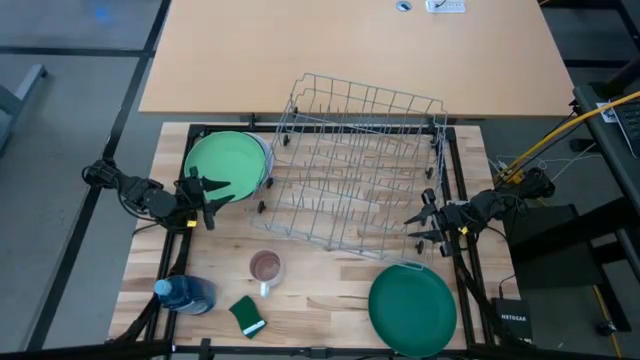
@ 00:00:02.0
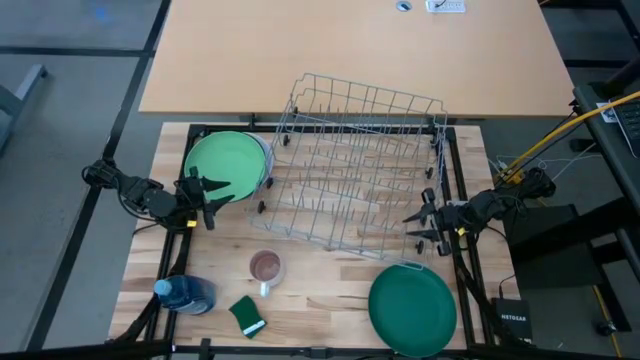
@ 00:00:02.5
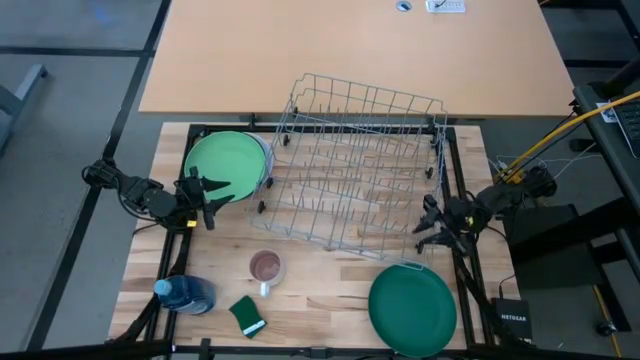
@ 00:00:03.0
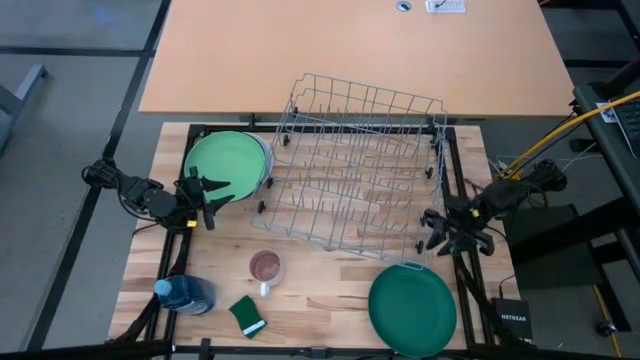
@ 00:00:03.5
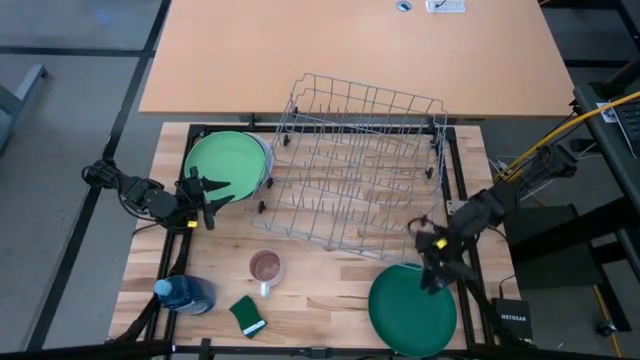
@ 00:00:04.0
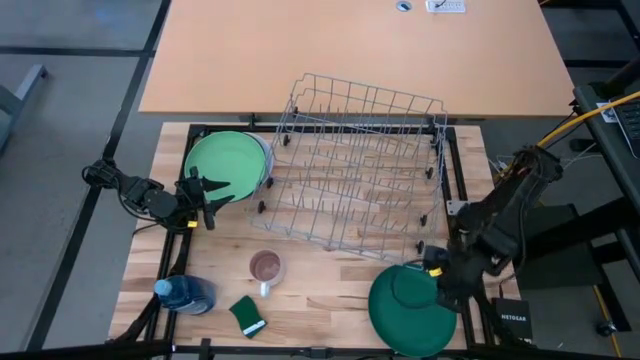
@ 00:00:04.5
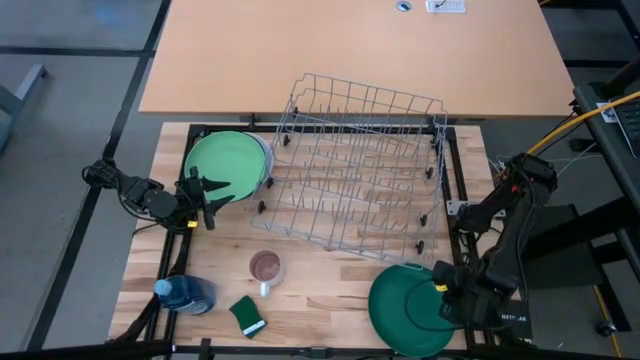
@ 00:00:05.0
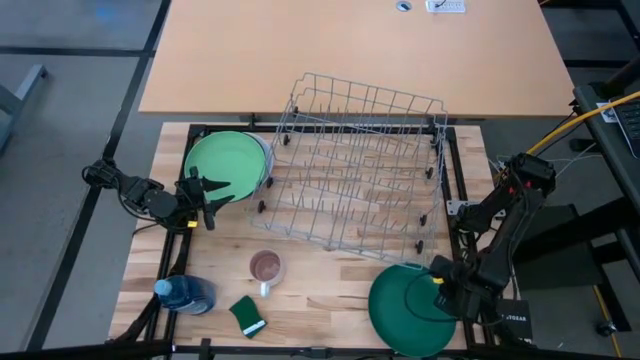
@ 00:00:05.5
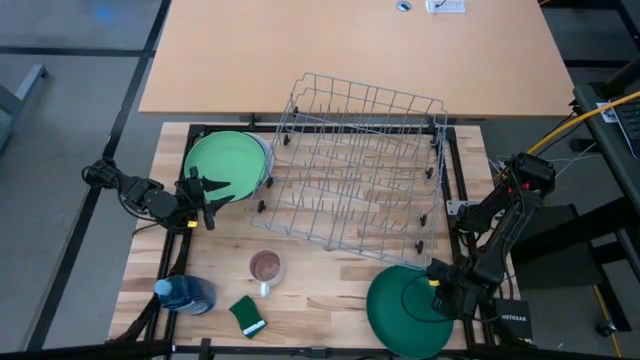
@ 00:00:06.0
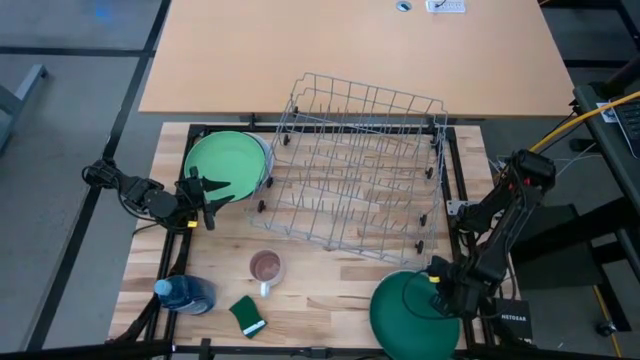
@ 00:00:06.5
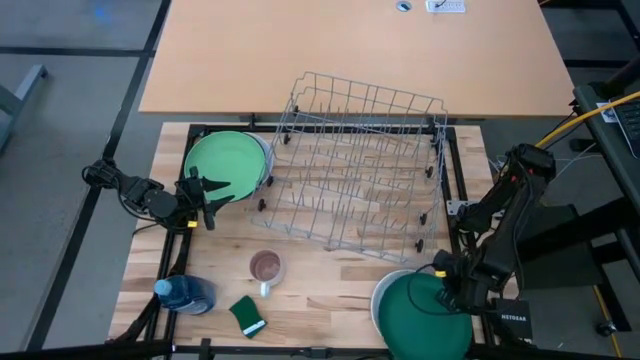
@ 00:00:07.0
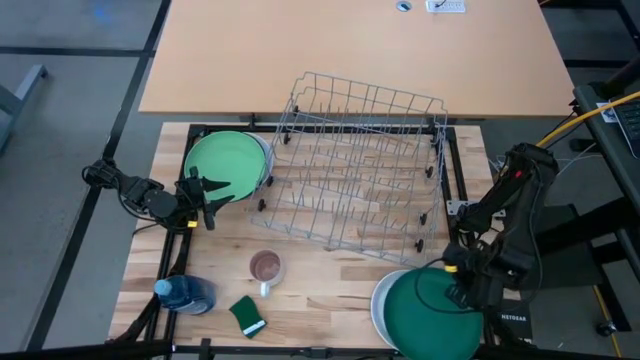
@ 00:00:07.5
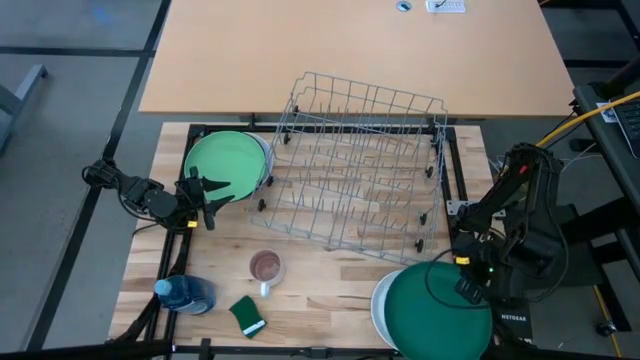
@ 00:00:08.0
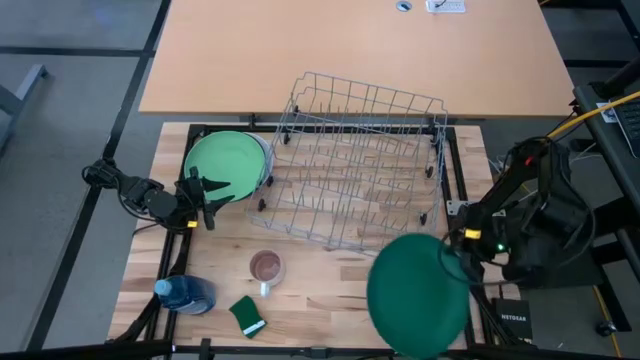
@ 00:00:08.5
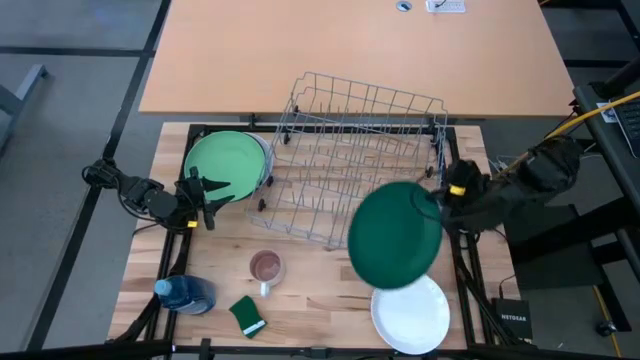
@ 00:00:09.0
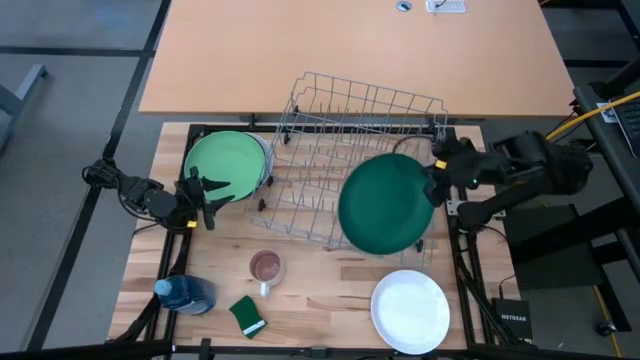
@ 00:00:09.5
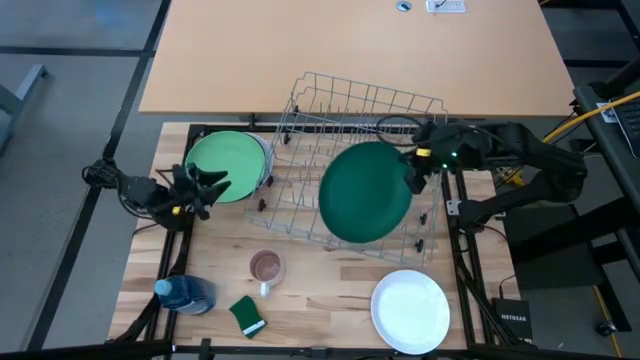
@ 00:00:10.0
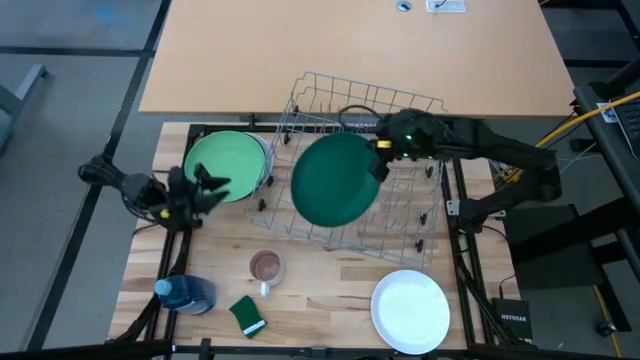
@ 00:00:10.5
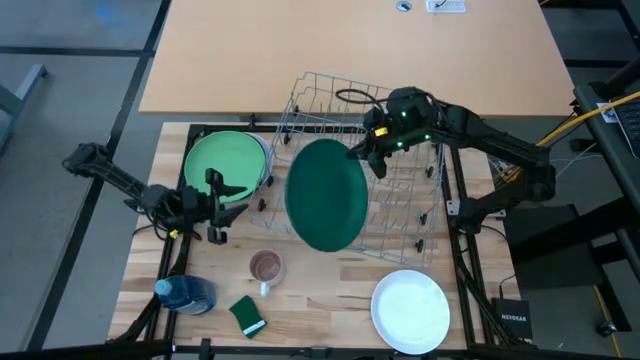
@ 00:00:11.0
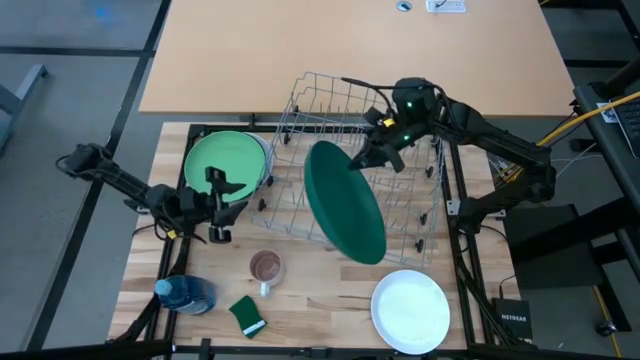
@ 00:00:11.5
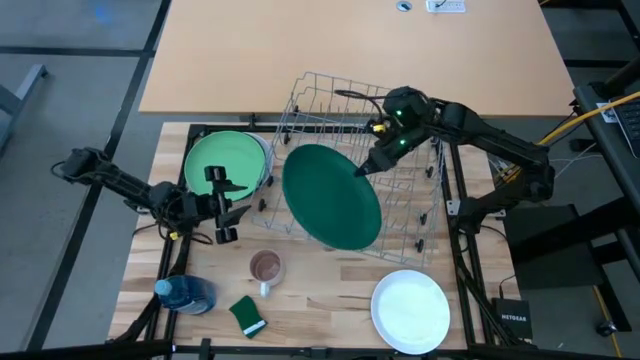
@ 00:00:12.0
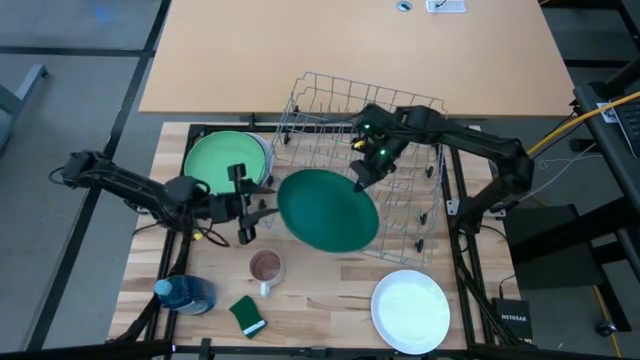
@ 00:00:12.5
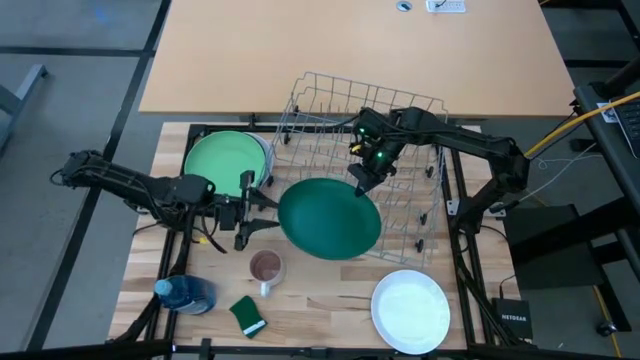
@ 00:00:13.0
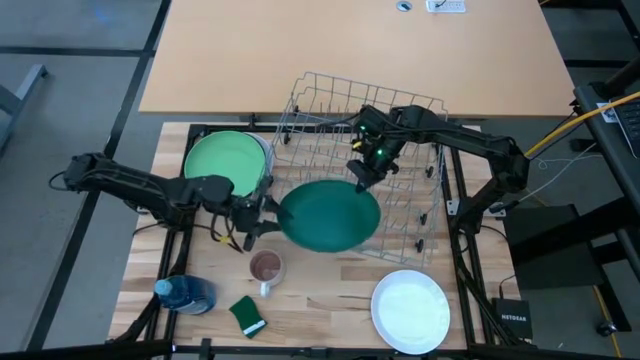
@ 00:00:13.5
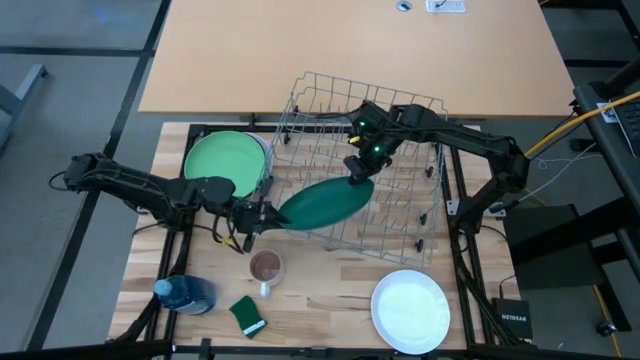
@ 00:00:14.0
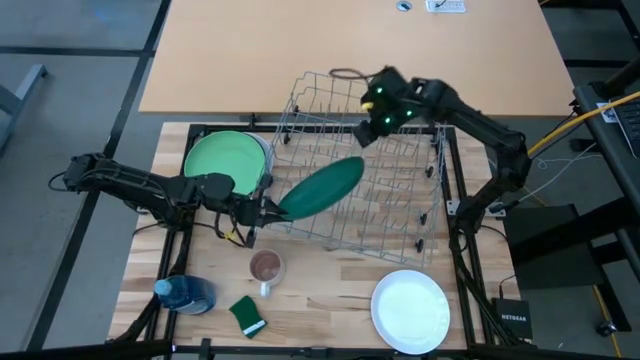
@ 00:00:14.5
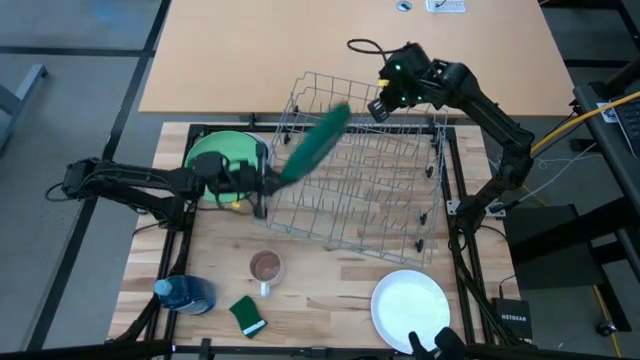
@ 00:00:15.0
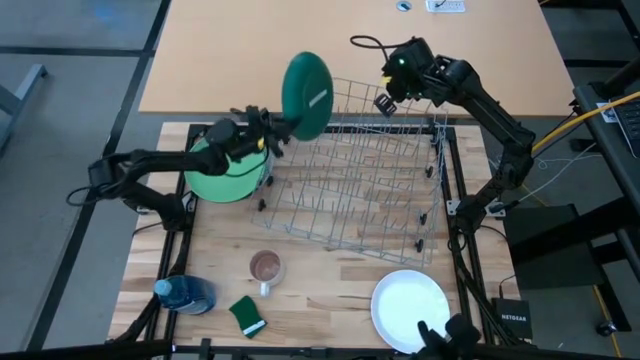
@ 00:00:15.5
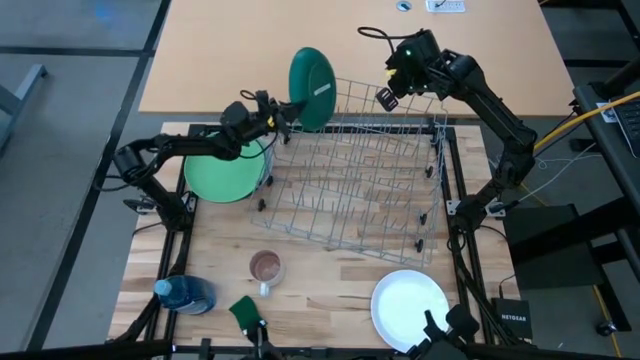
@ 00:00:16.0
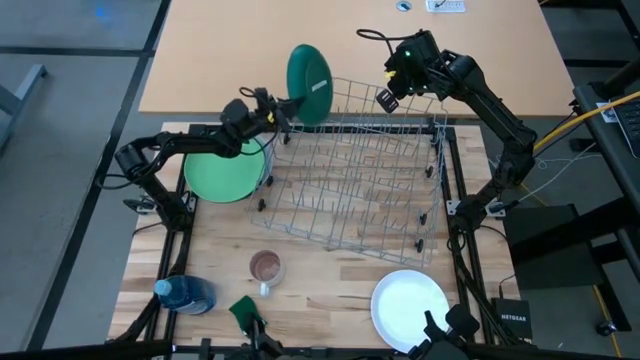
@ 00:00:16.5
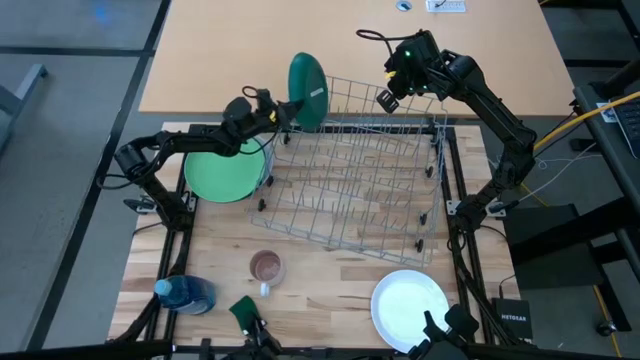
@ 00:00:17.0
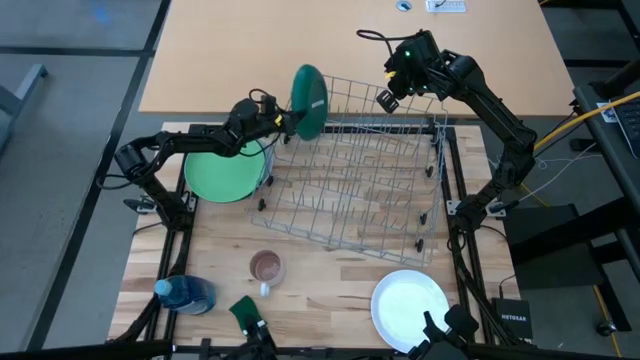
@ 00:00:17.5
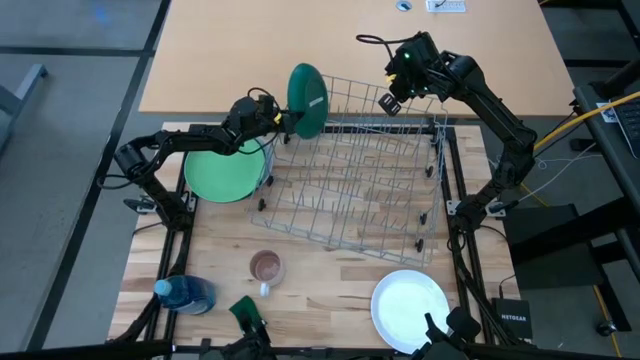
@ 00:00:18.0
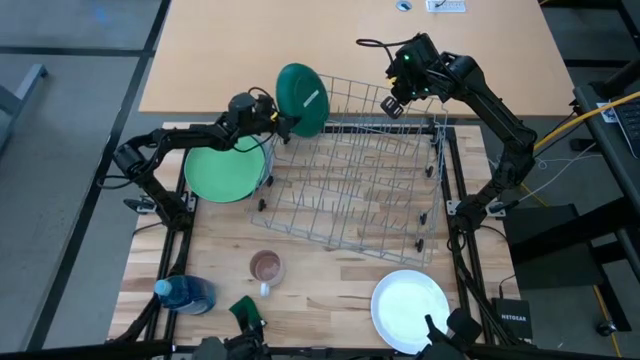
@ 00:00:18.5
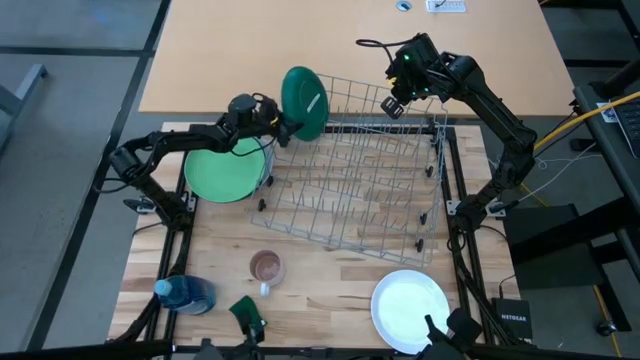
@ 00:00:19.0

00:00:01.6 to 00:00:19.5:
Task: Sort dishes
Put the bottom green plate into the dishwasher rack
